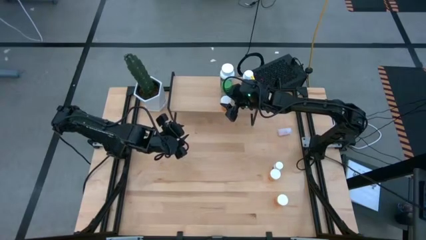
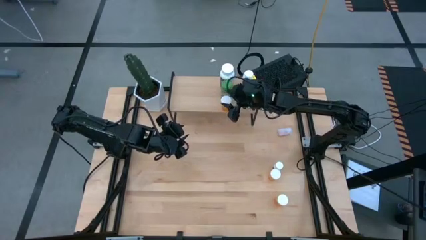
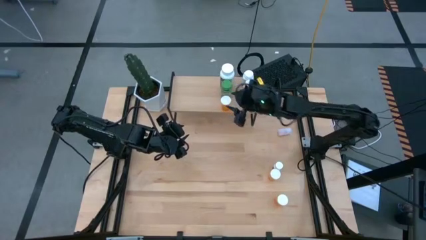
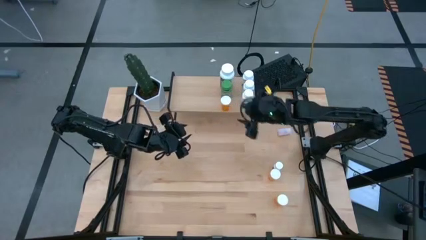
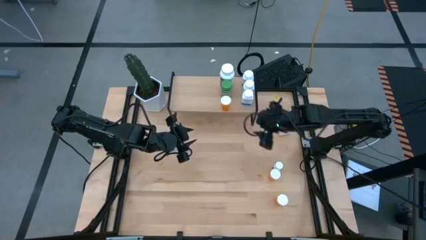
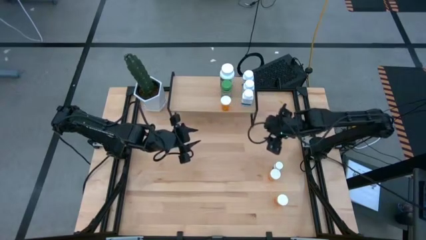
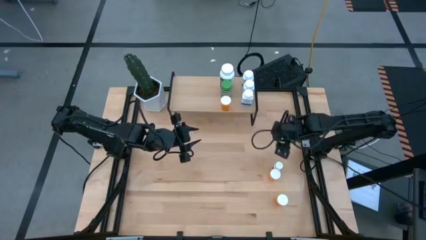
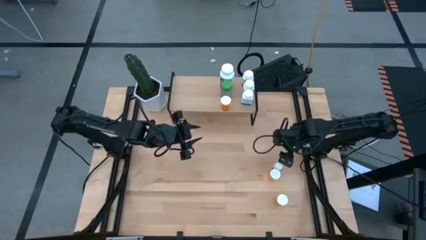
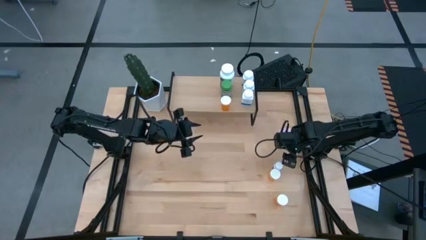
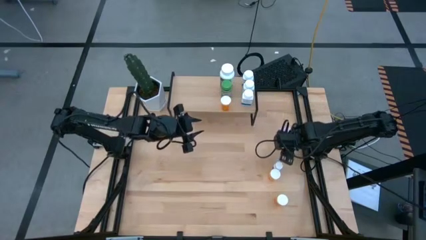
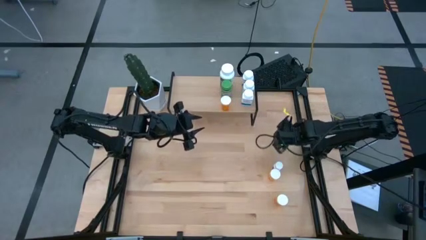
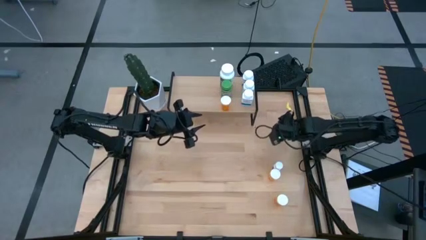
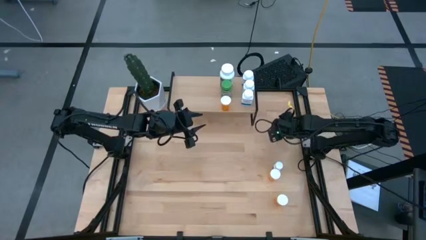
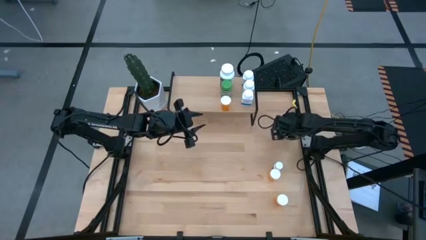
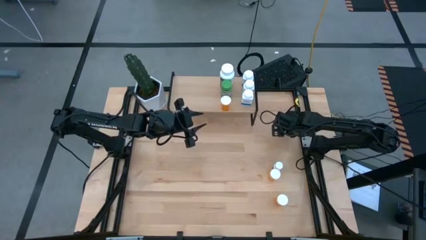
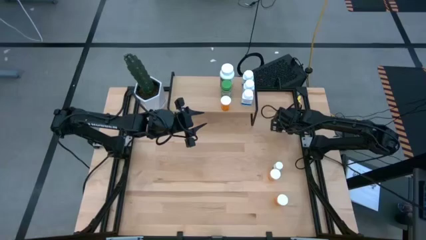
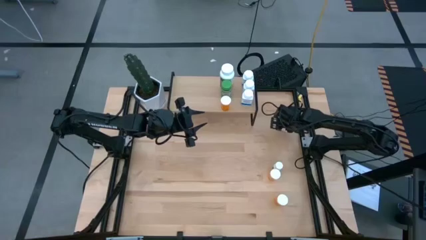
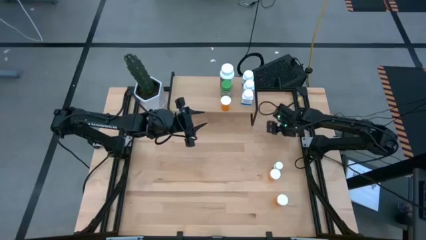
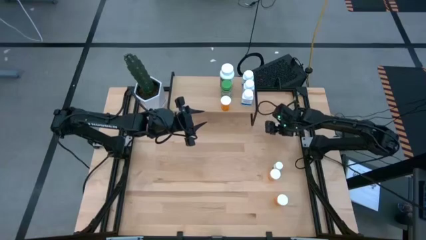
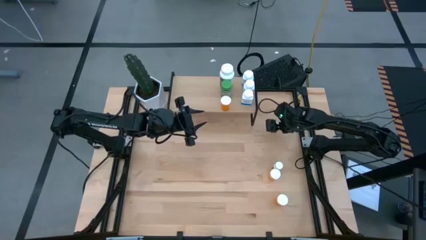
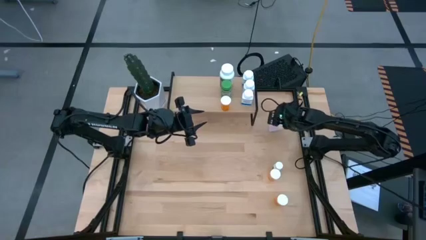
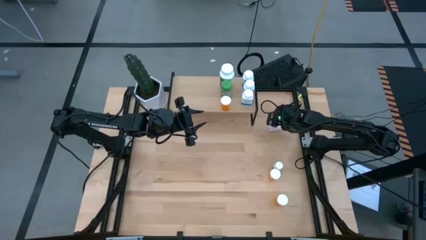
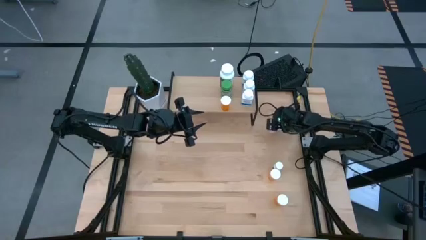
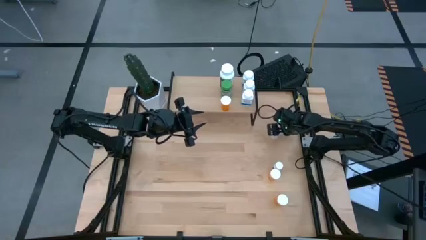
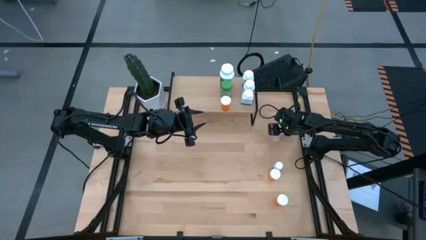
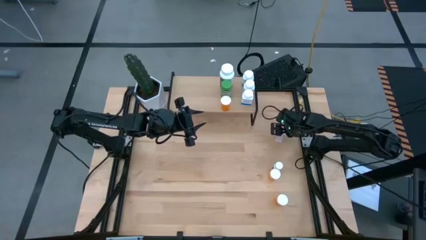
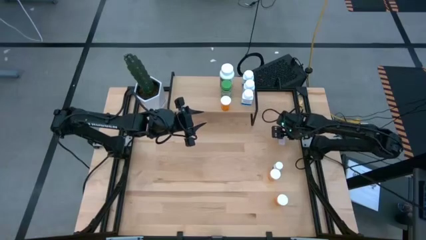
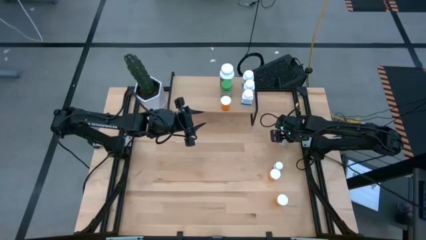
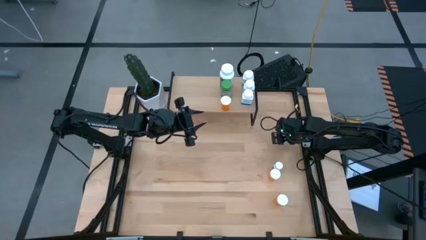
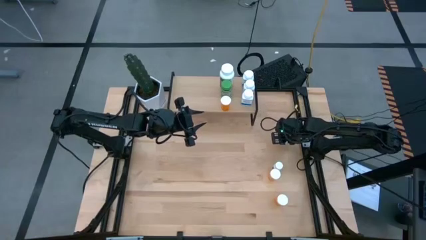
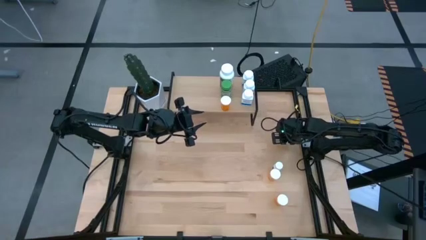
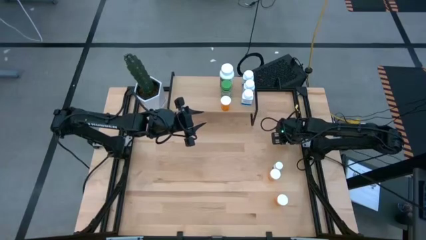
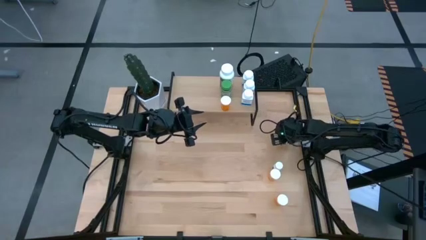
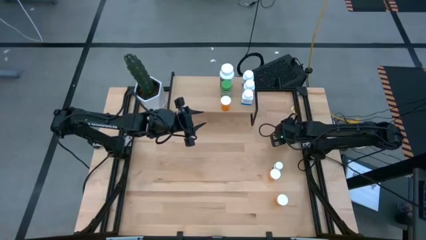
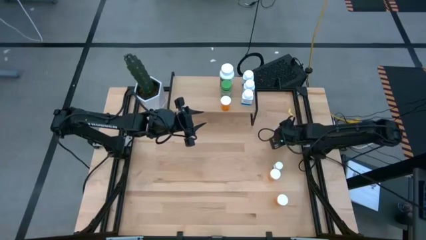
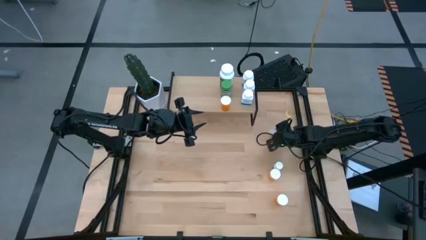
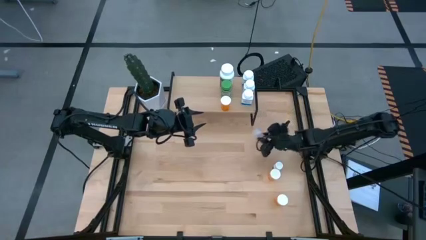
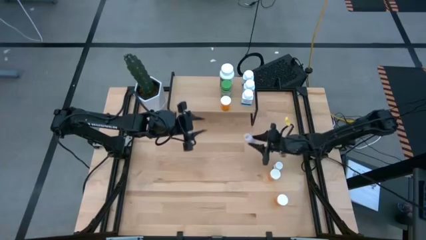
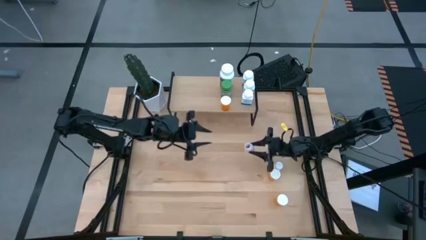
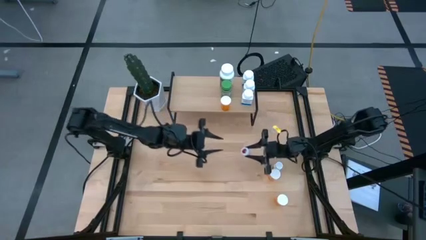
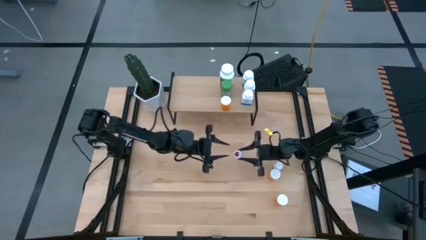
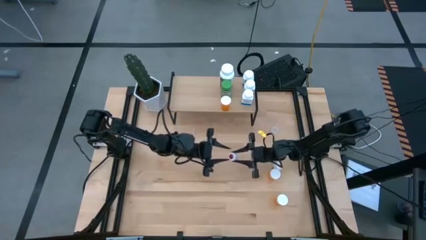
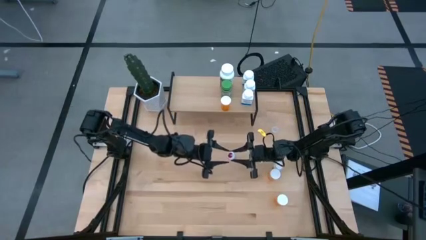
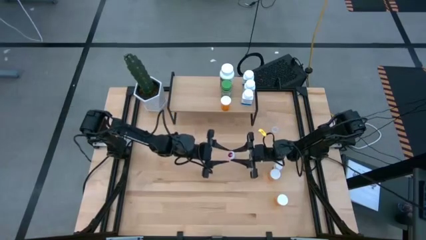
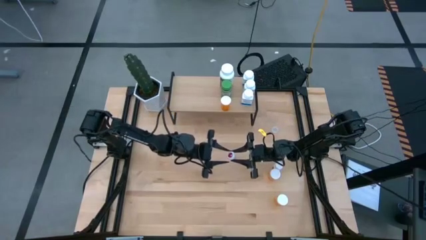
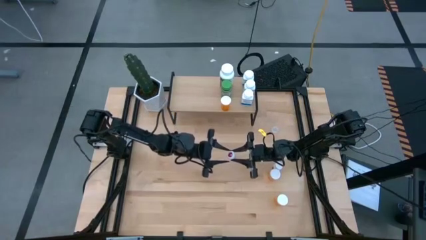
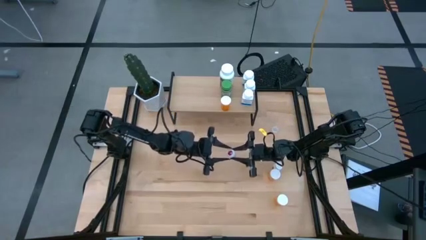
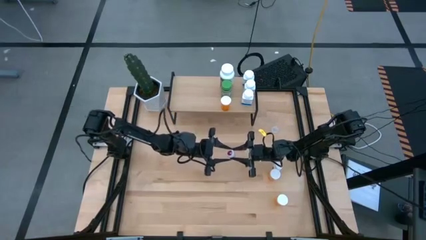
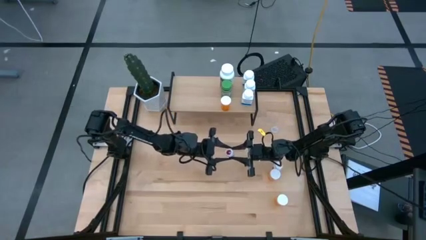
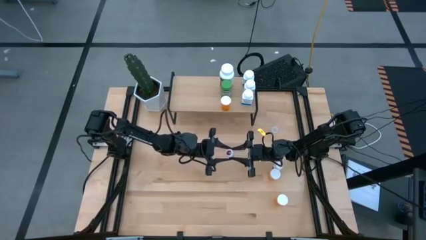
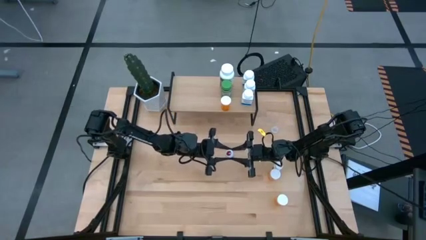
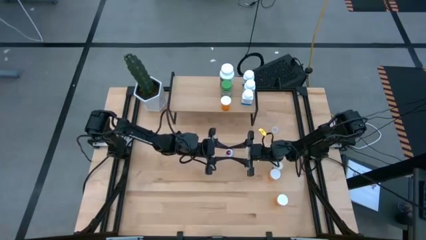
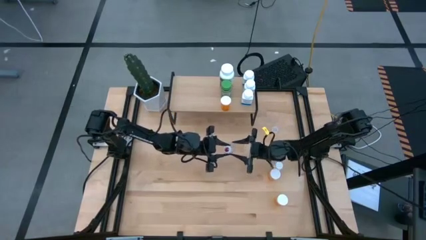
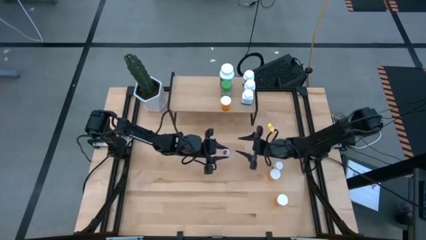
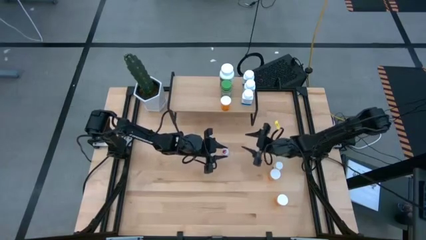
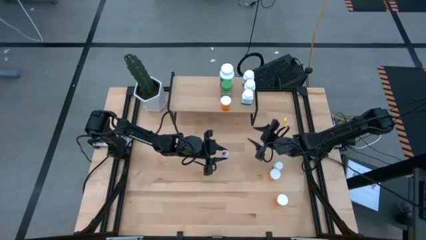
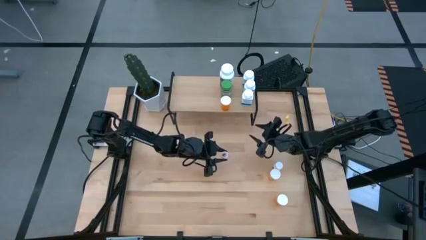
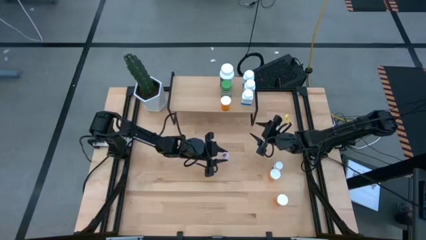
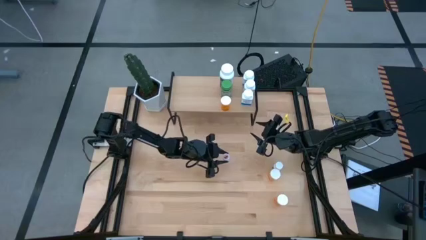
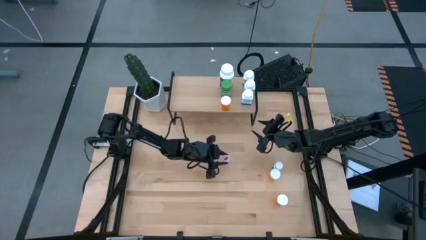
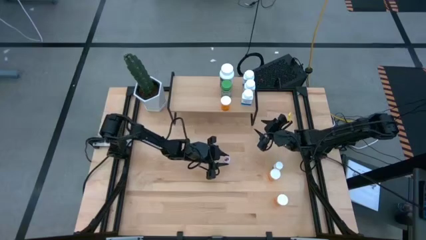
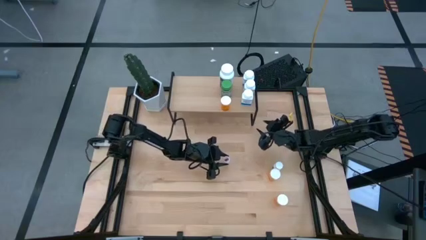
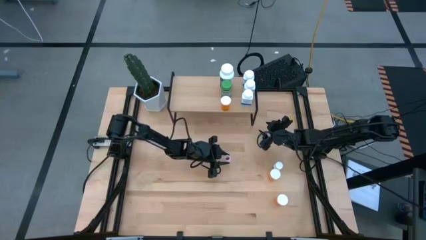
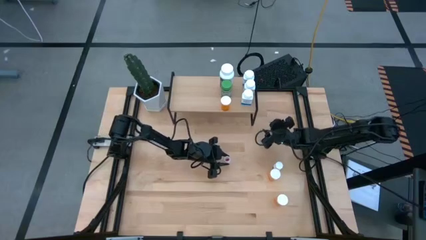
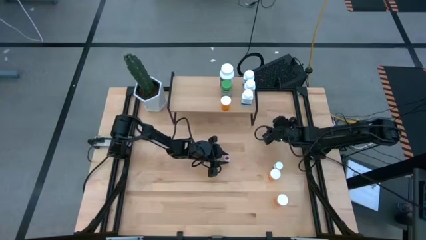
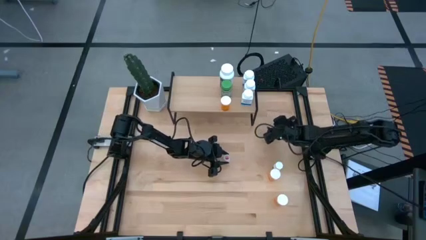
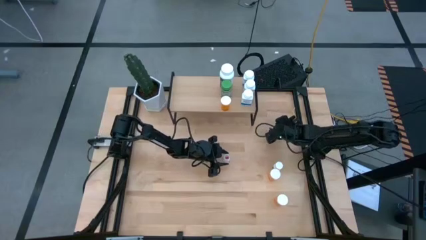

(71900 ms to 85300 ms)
Task: Pick and place medicine bottles onto shelf by color
Move the transparent capsule bottle to the center of the table

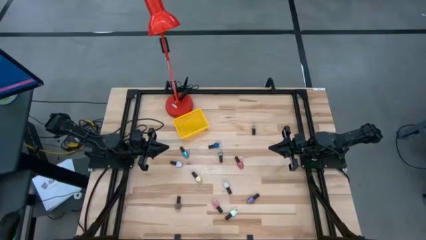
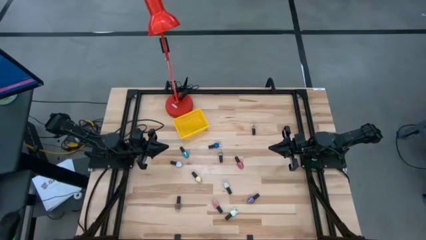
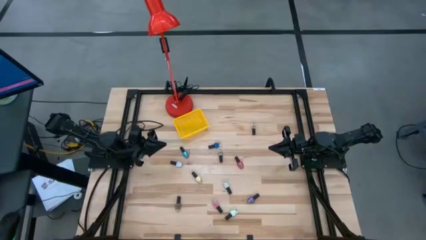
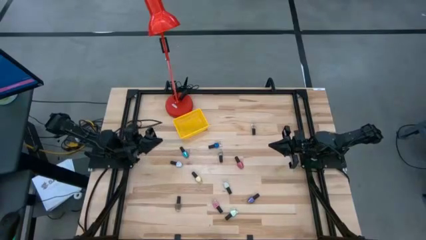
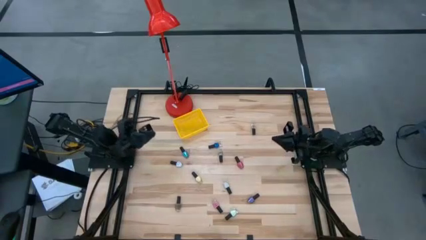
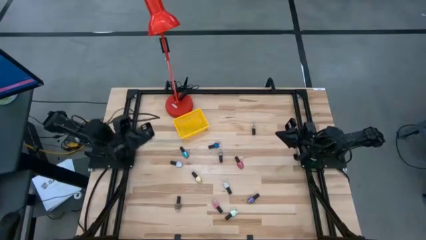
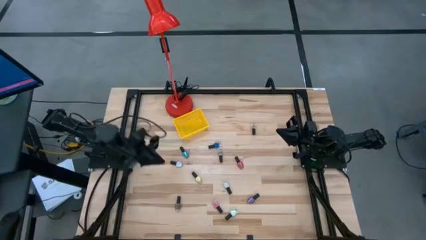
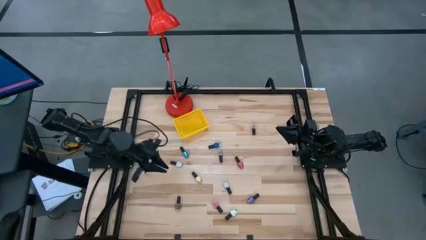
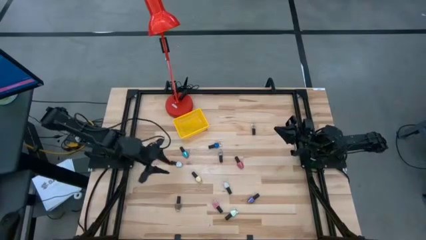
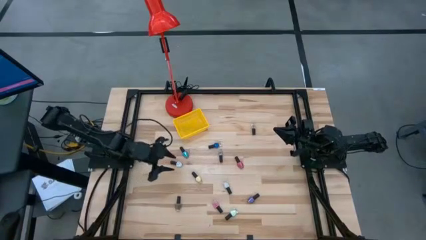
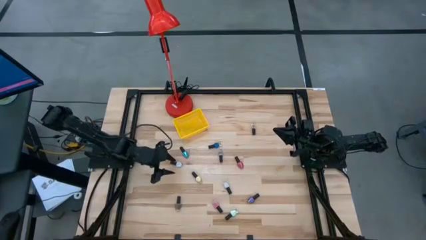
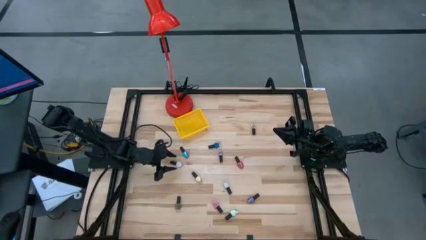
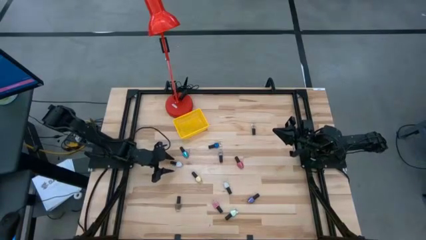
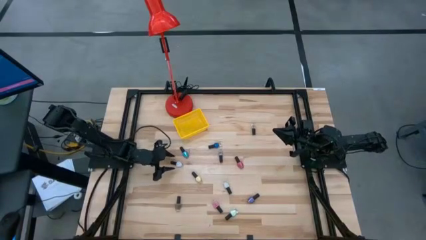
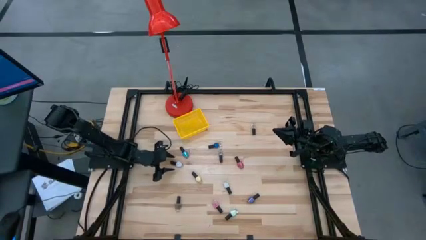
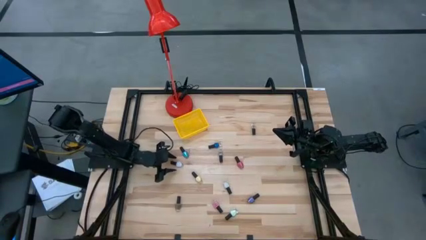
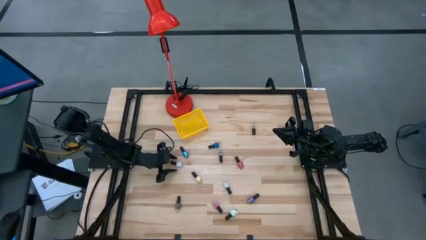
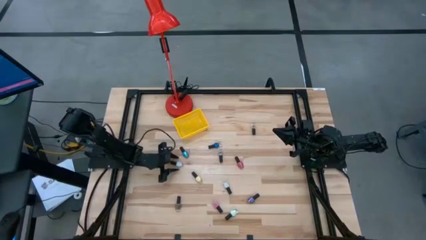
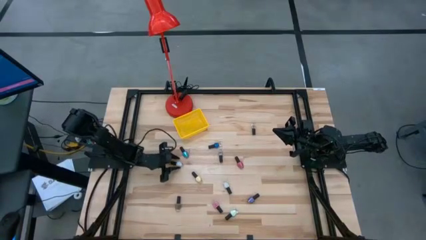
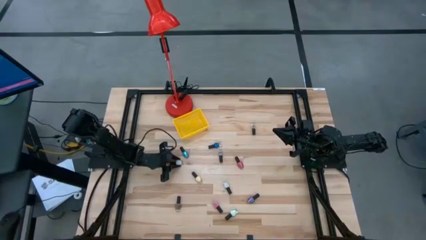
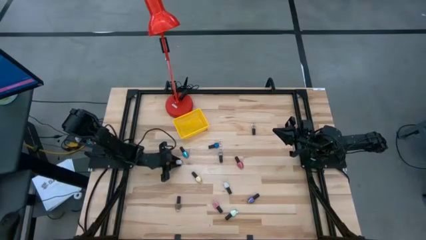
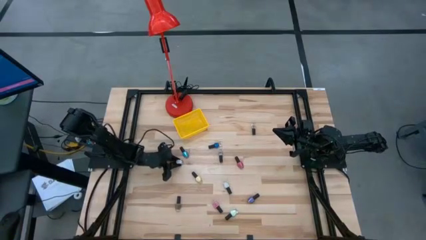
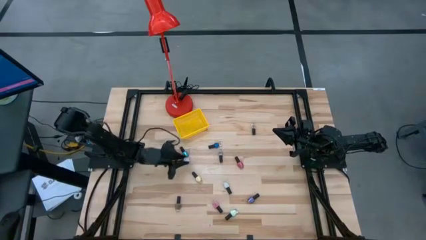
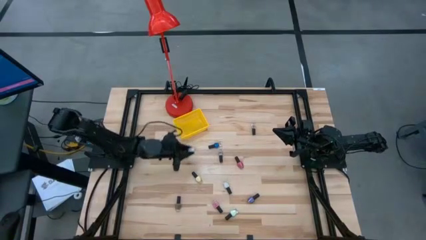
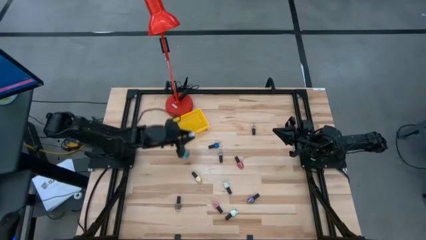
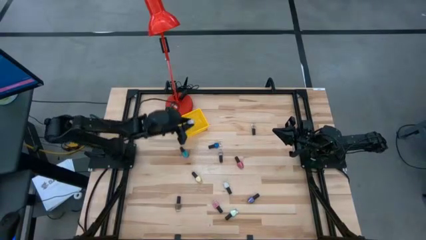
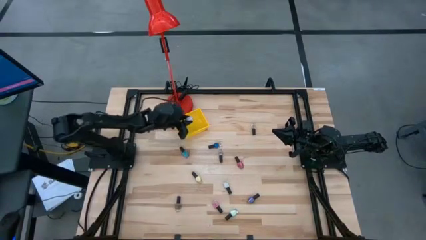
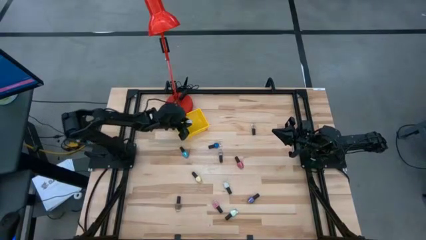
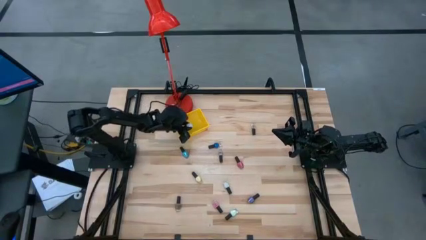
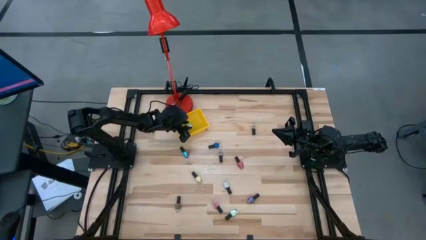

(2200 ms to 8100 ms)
Task: Pick & Place Nail Polish
Put the white nail polish into the yellow basket
